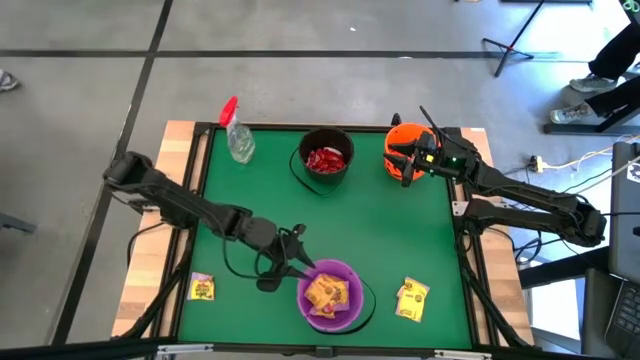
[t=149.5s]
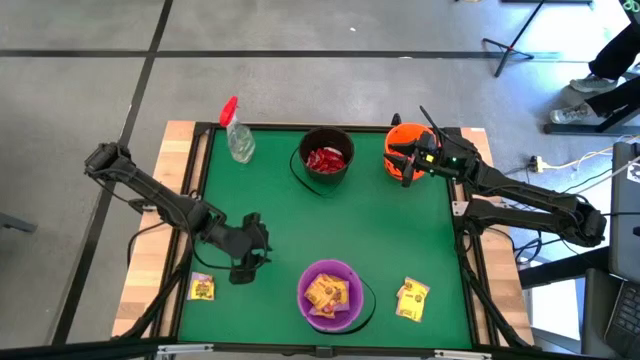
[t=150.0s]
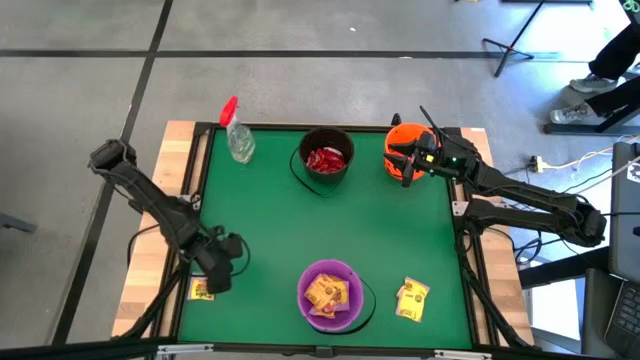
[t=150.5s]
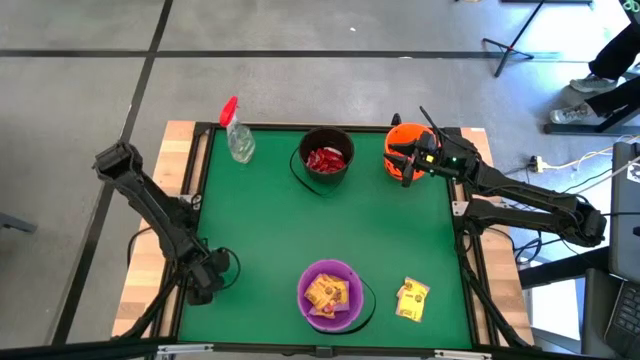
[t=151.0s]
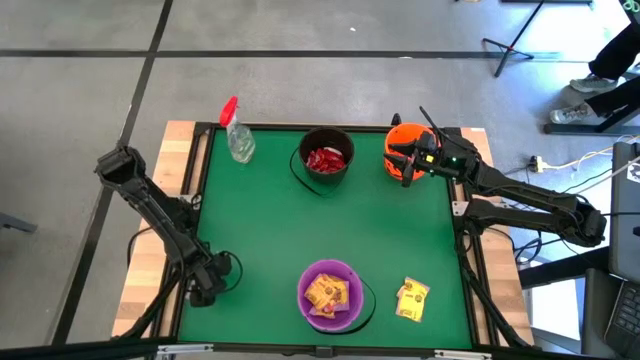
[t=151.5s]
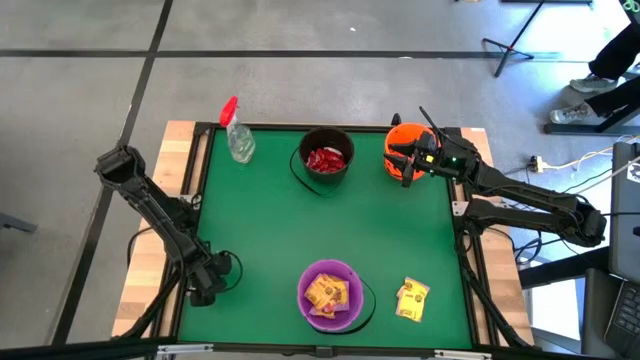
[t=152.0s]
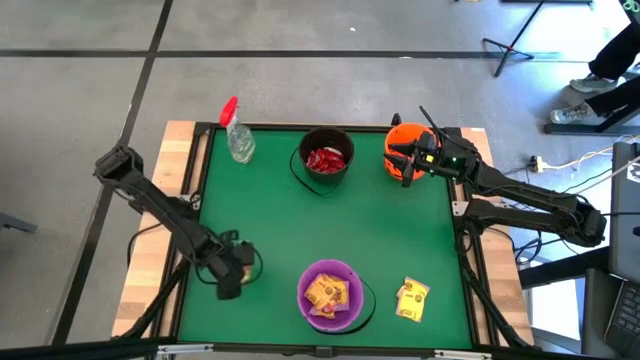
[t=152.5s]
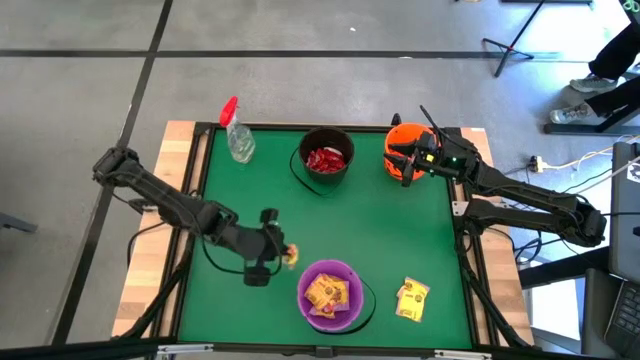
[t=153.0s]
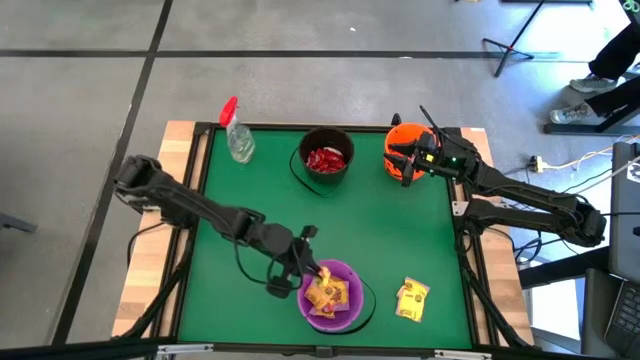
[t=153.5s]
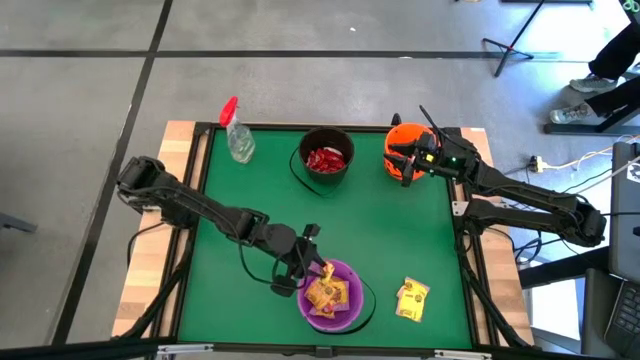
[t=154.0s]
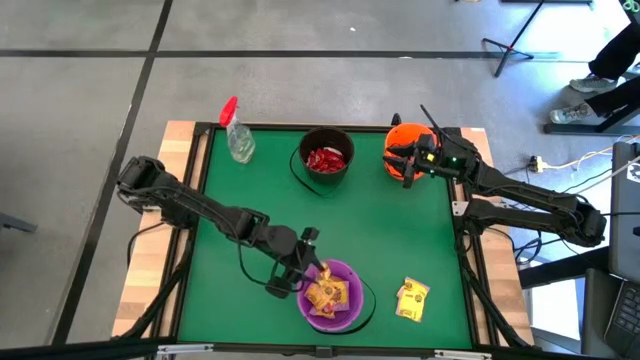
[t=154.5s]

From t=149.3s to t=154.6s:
Task: Organize candy in baskets
Put the left yellow candy pack into the purple bucket

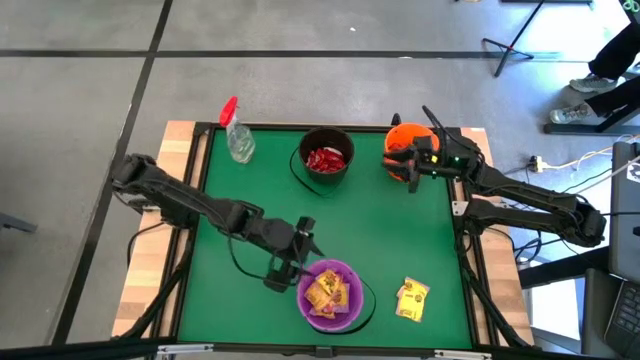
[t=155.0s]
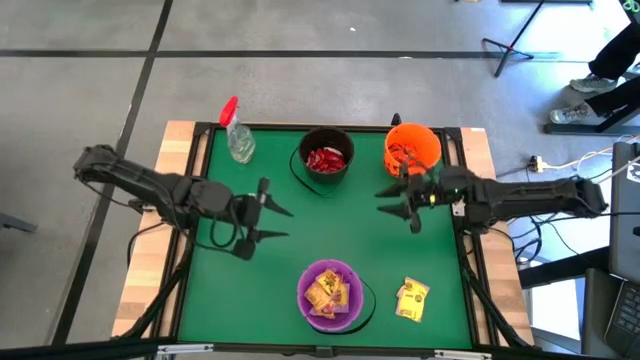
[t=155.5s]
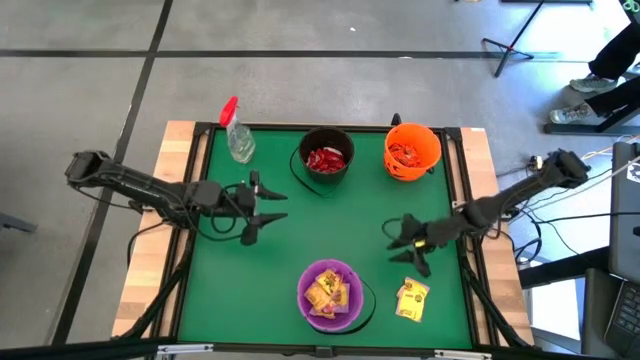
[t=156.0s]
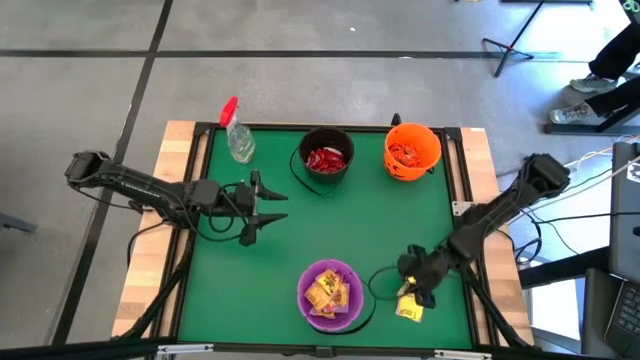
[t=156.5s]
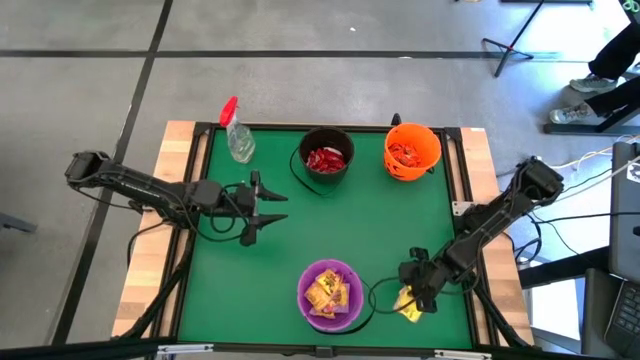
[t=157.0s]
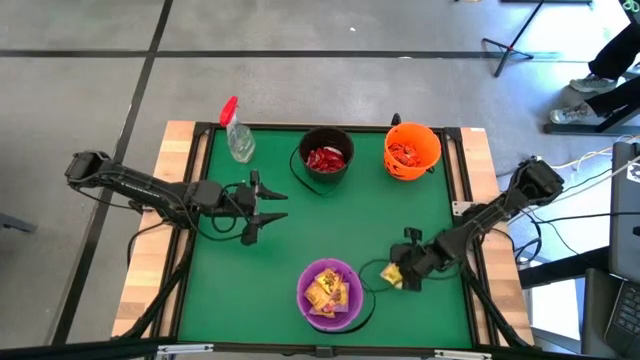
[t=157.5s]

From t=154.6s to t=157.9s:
Put the bottom yellow candy pack into the purple bucket

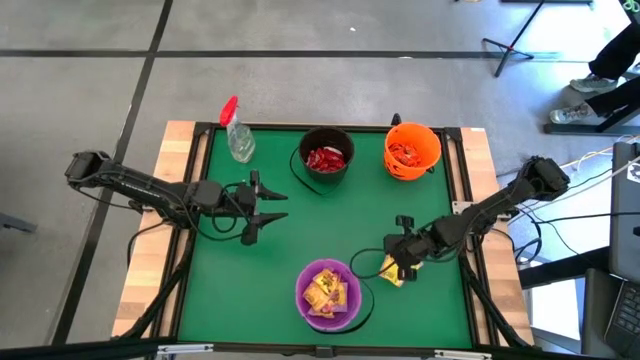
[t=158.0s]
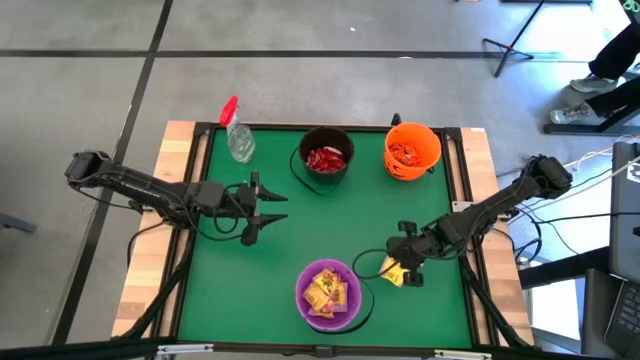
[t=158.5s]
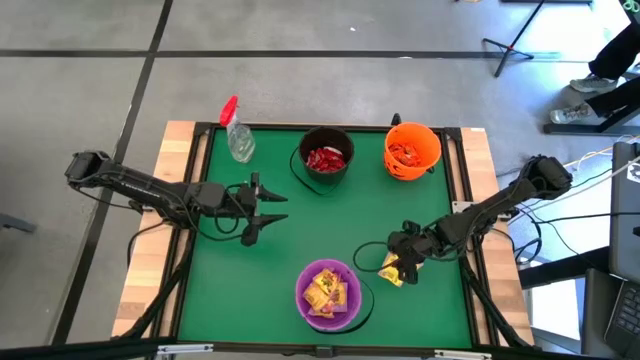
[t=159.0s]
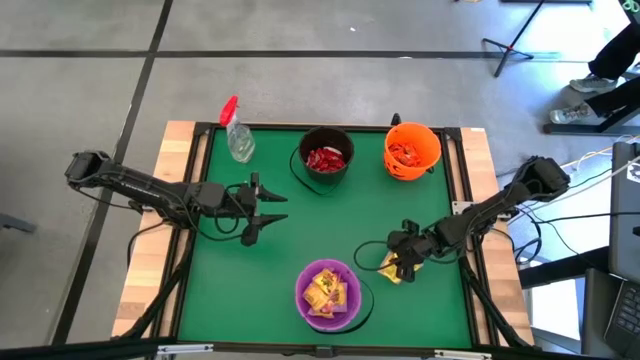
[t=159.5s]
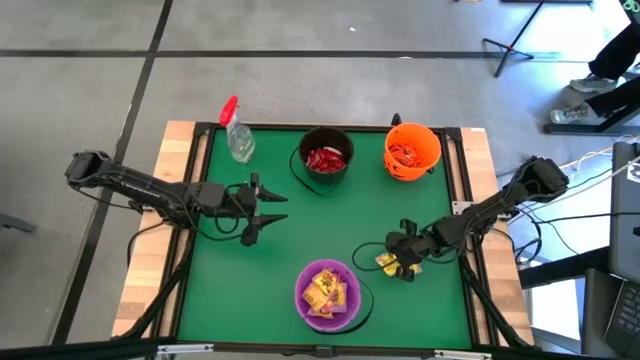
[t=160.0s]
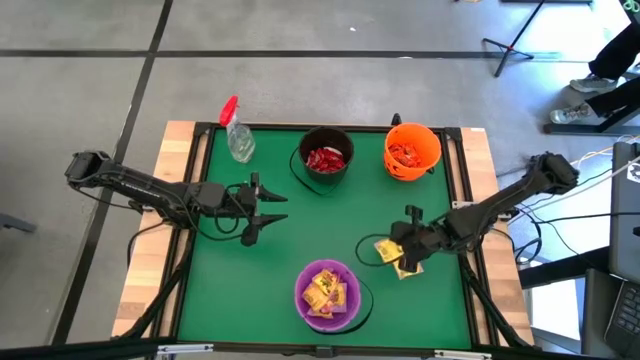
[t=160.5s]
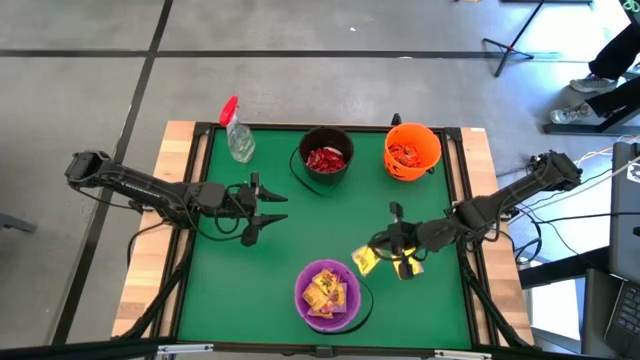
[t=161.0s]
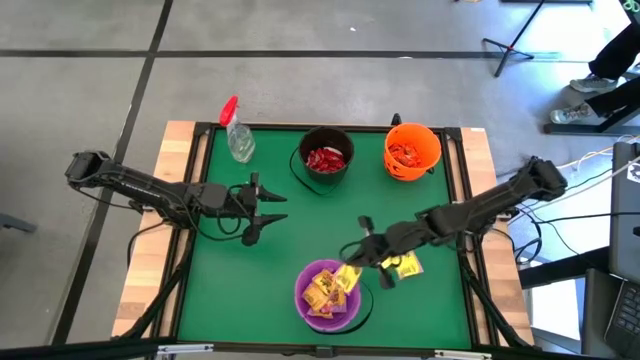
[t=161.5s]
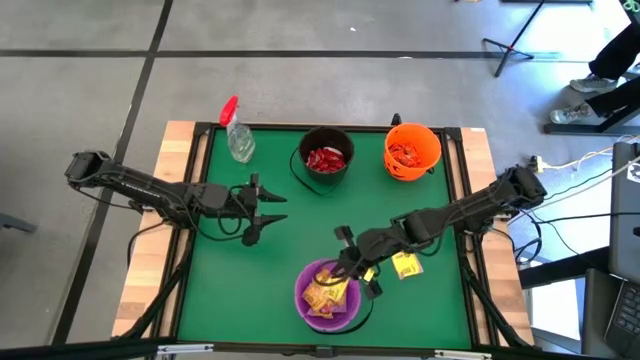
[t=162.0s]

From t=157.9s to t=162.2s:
Put the bottom yellow candy pack into the purple bucket

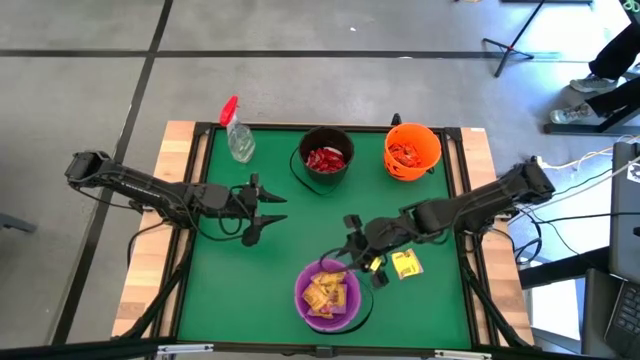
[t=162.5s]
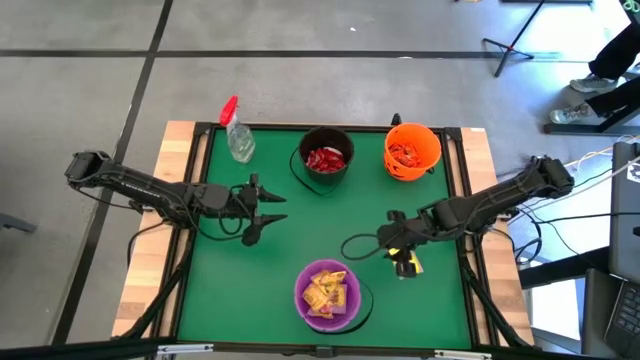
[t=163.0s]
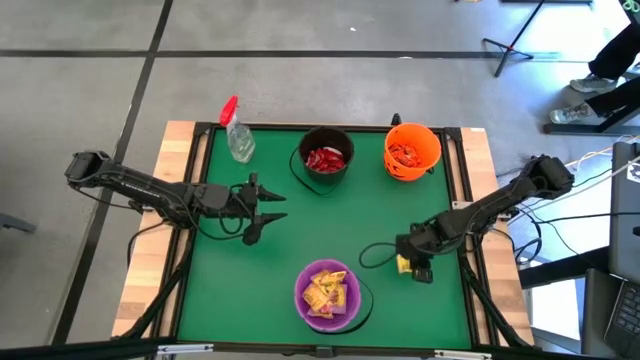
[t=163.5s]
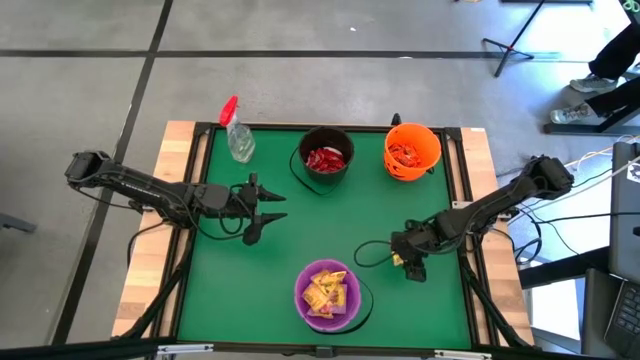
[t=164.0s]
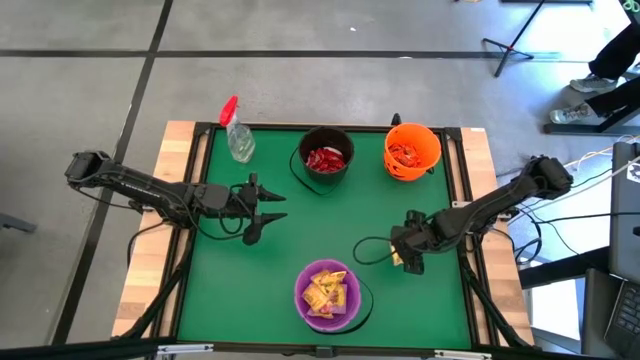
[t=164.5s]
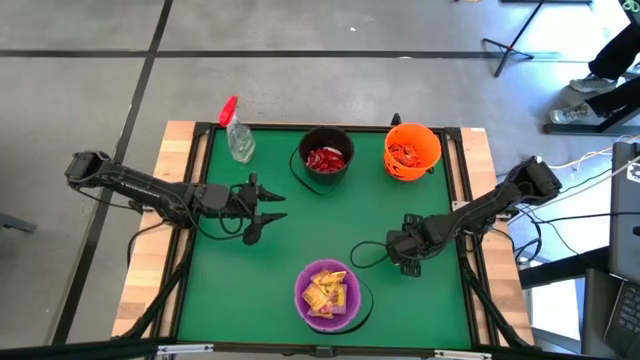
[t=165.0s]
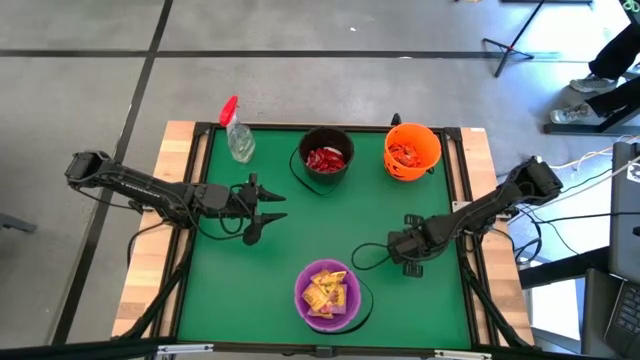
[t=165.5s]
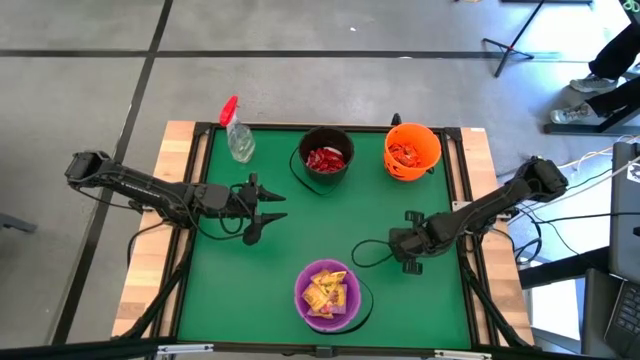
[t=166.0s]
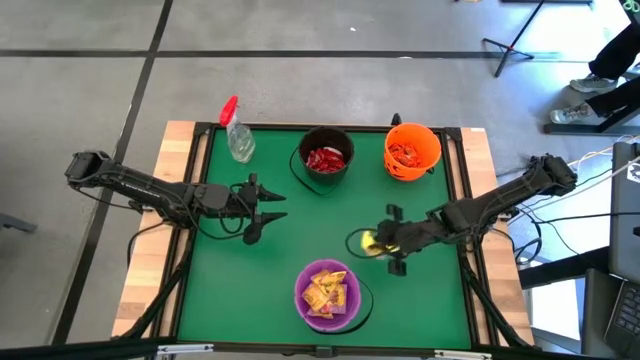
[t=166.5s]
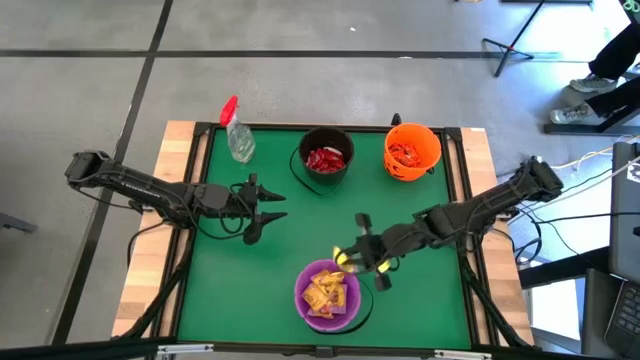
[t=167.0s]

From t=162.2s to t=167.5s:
Put the yellow candy pack into the purple bucket

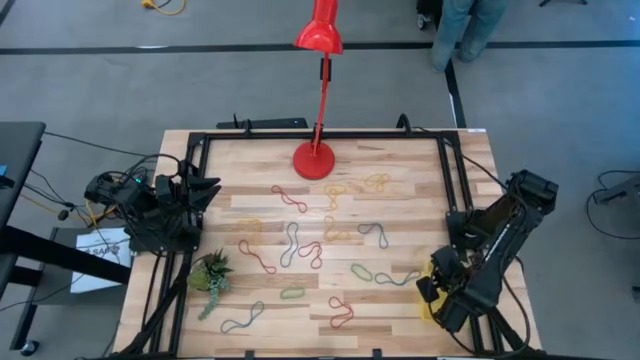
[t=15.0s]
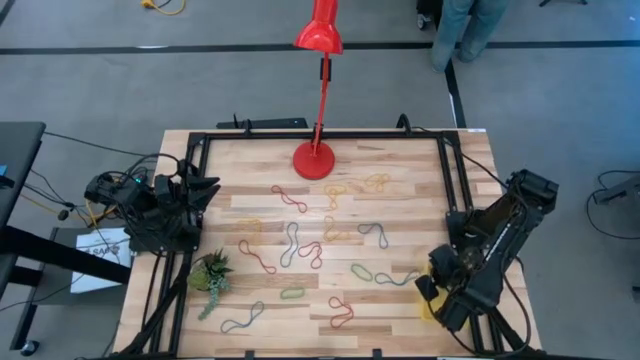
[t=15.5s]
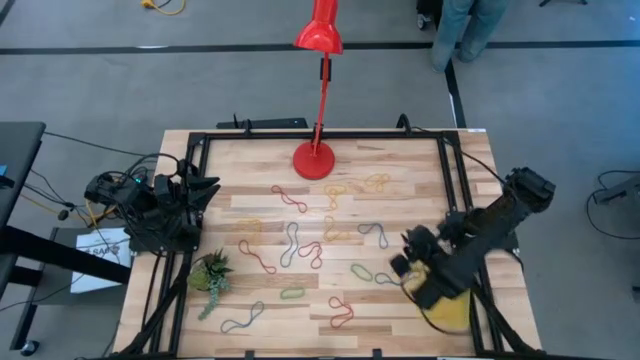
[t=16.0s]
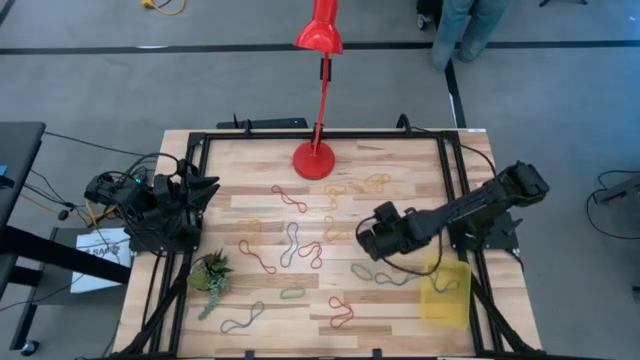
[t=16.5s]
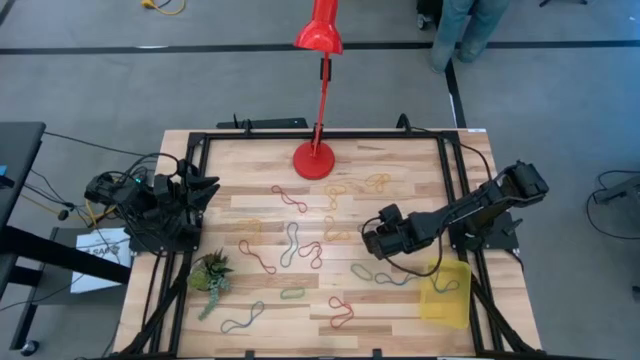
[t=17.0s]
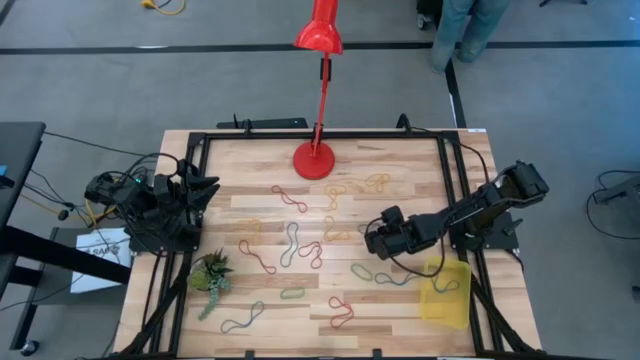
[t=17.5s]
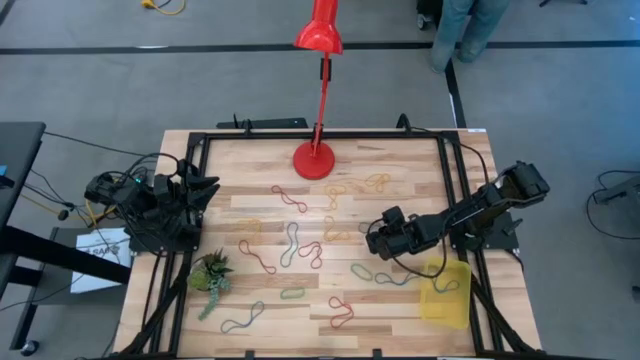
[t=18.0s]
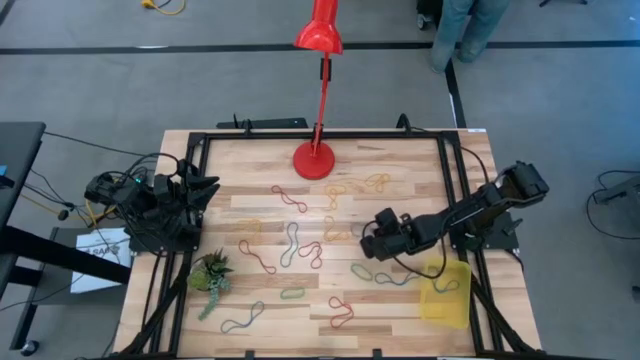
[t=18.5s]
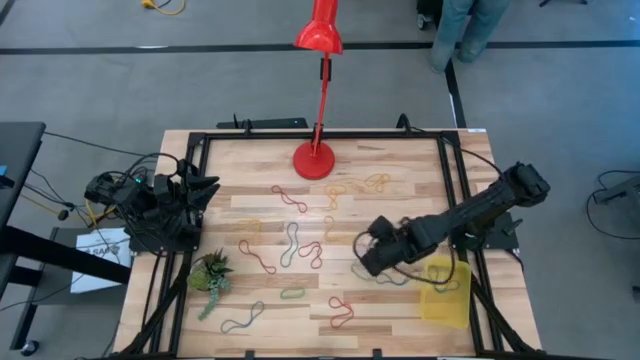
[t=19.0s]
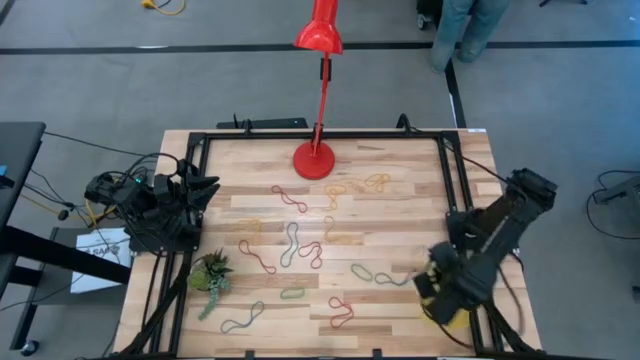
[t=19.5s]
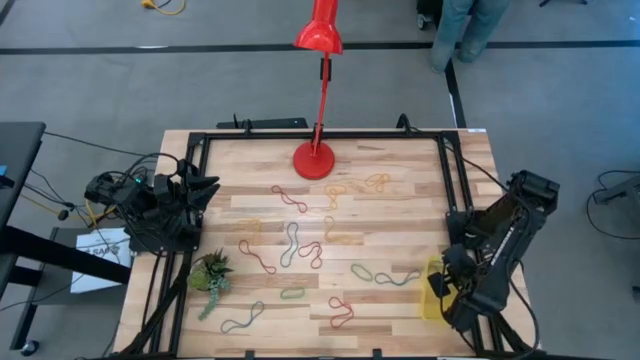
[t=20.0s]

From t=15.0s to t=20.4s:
Task: Pick and place rubber bands into bin
Put the blue rubber band into the container
